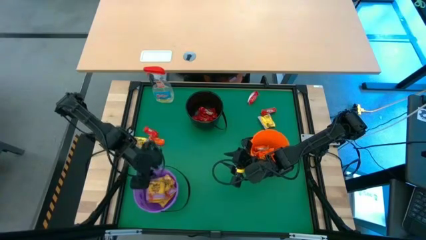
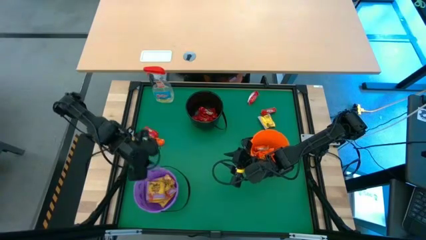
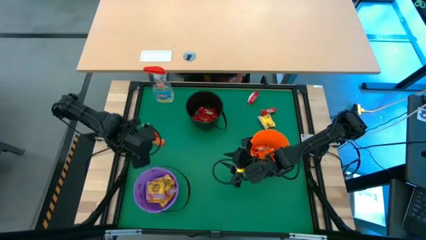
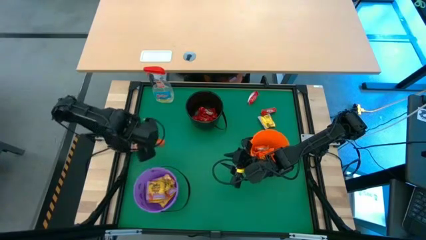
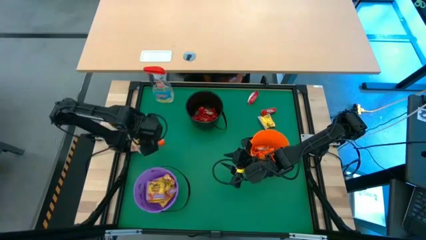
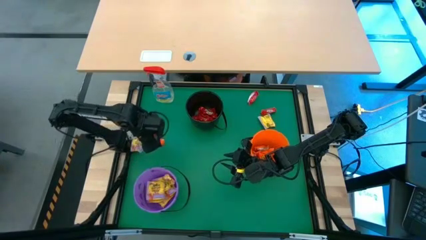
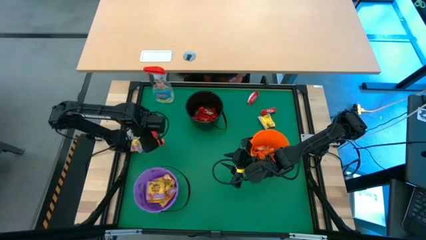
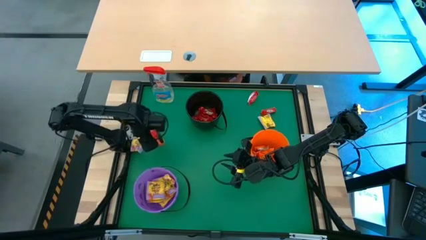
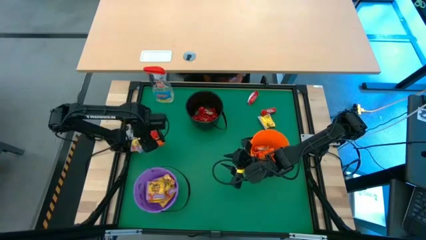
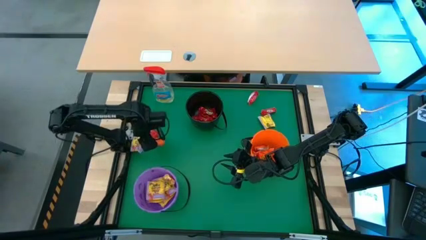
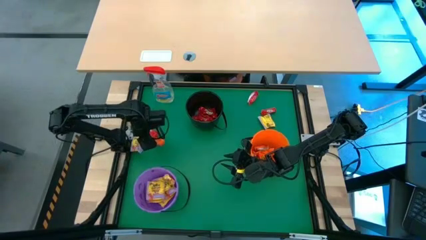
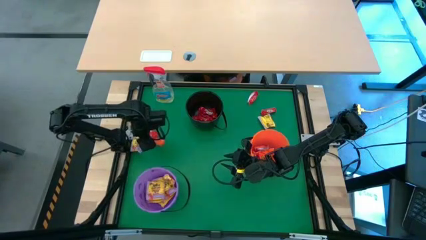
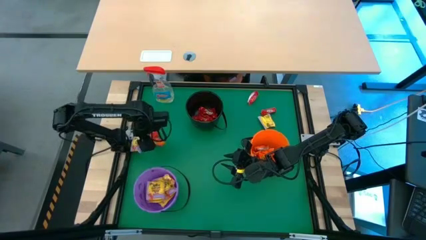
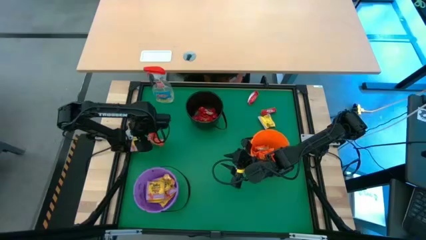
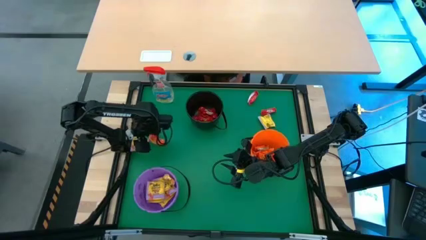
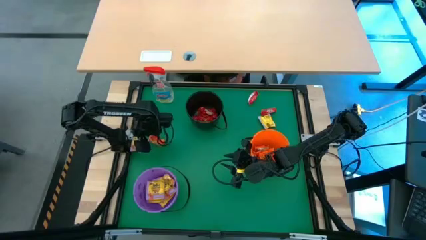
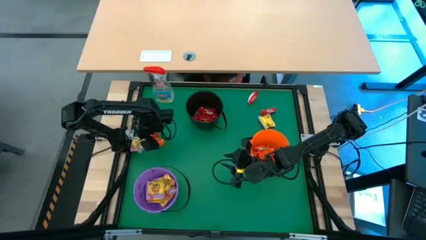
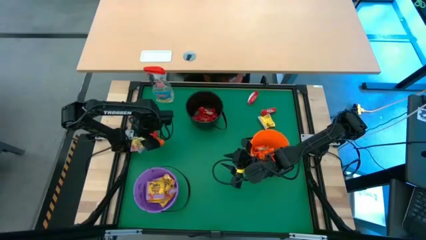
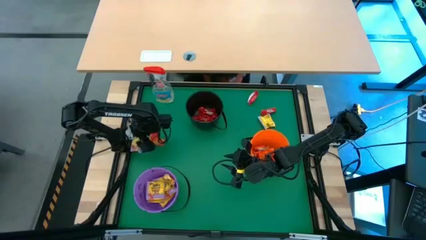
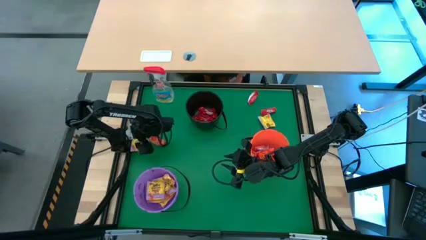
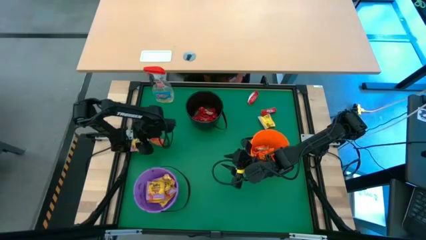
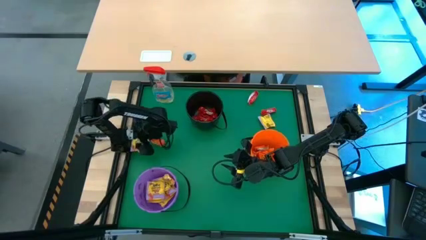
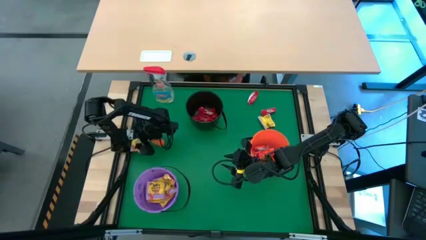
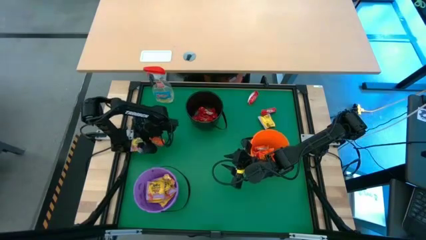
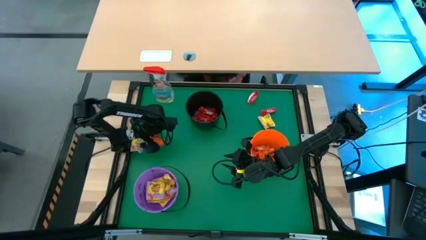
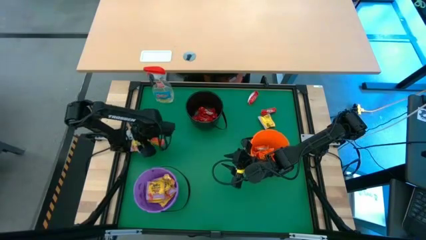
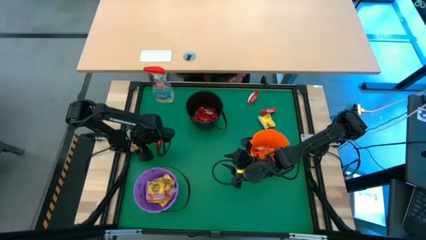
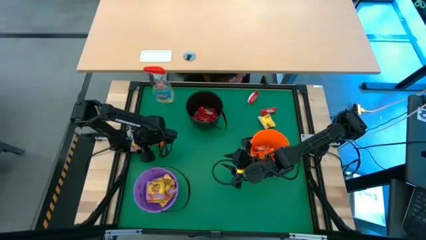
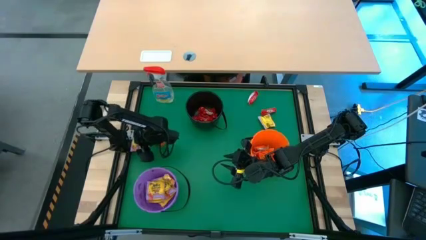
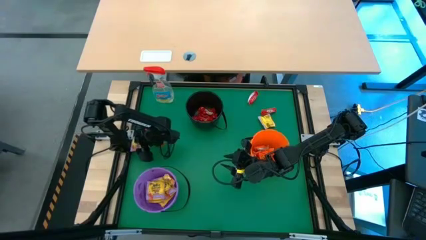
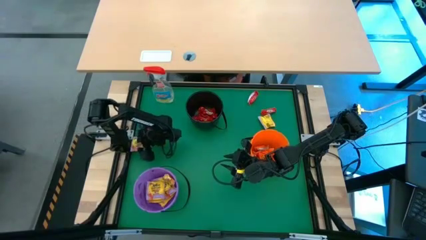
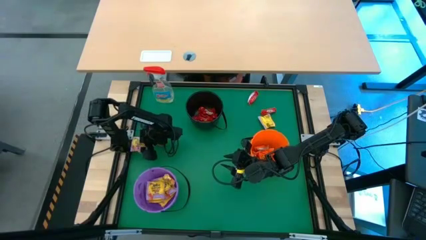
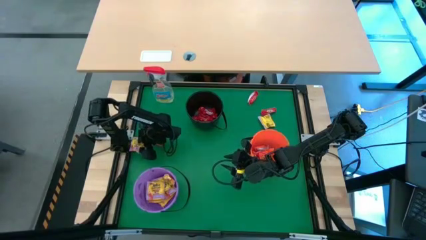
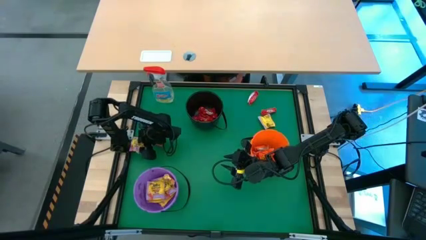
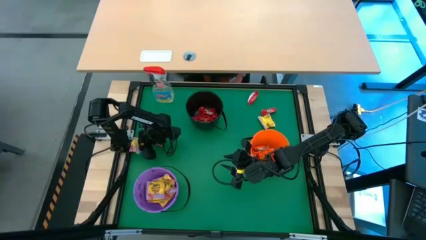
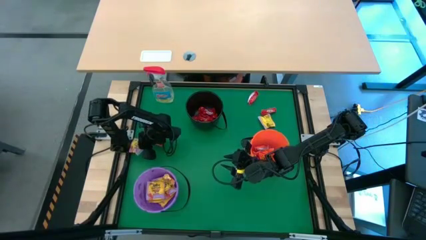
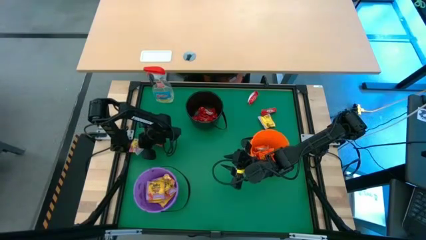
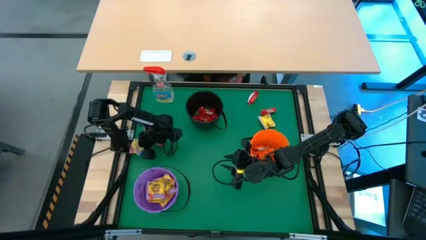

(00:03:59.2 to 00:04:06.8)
Task: Sort candy
Put the yellow candy into the violet bucket

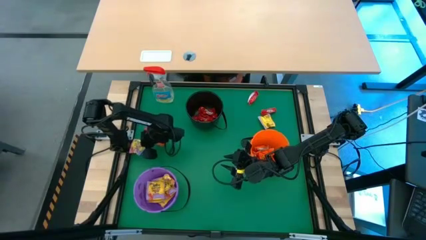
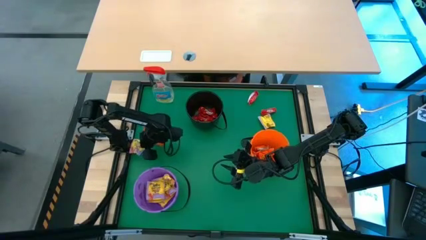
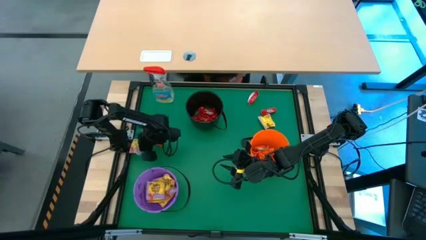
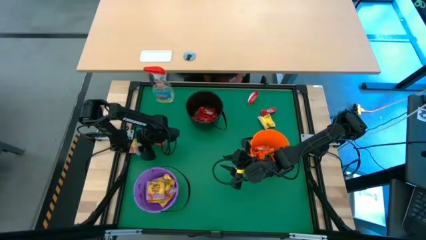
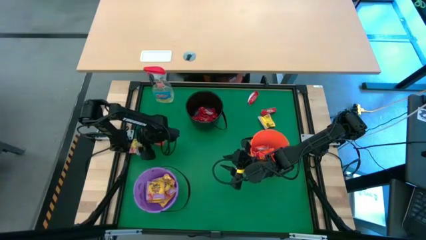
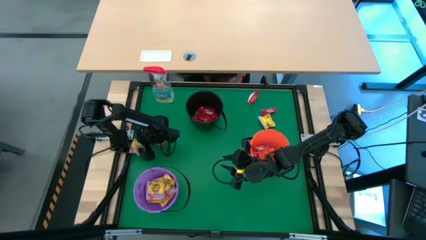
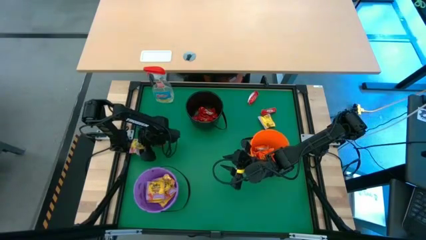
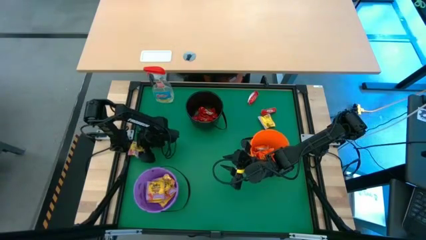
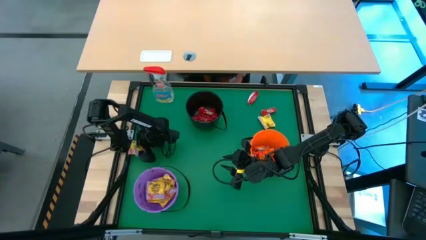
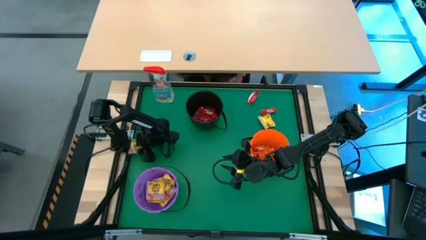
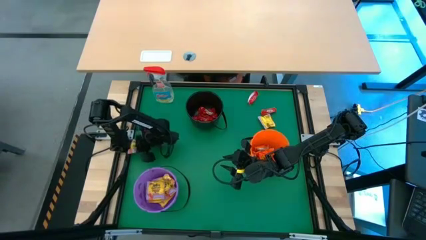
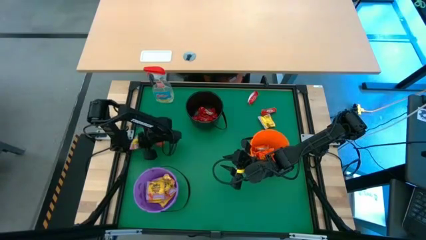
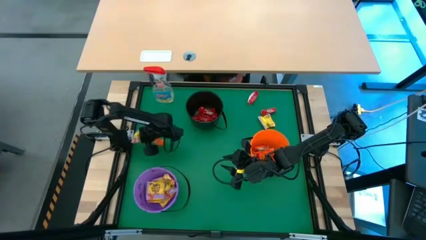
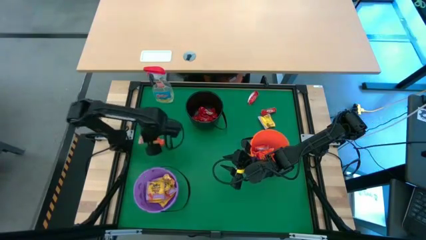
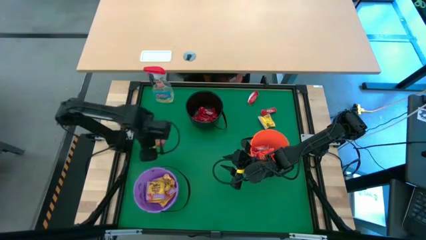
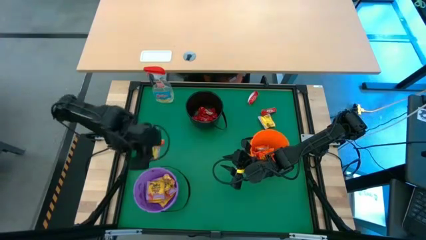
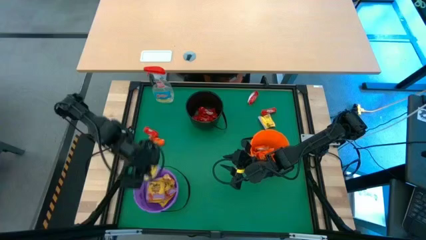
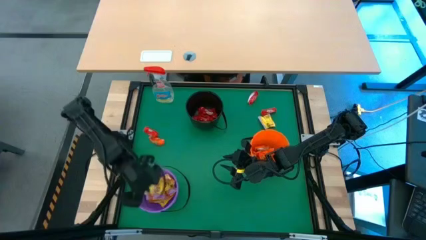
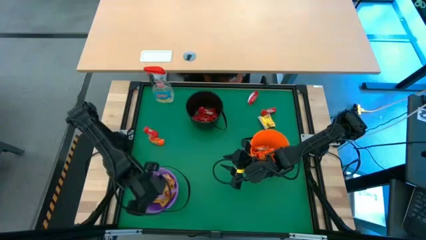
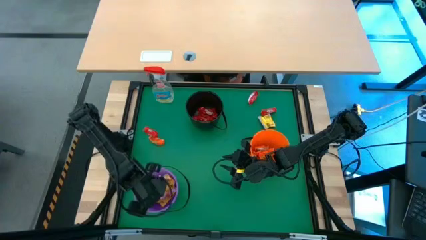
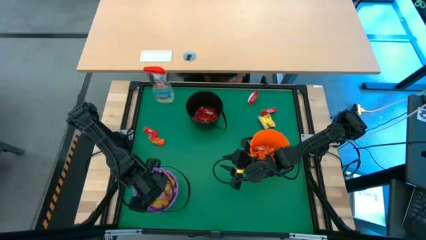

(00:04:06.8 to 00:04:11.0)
Put the yellow candy into the violet bucket

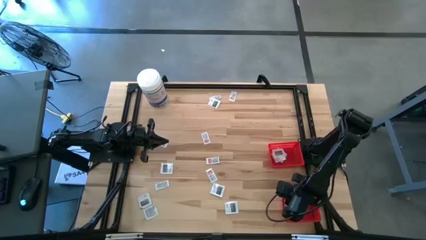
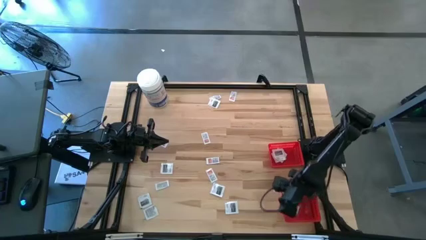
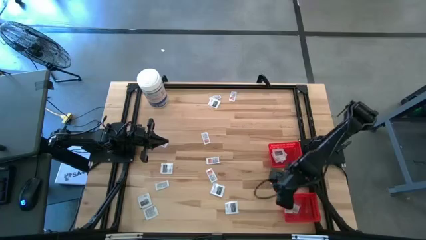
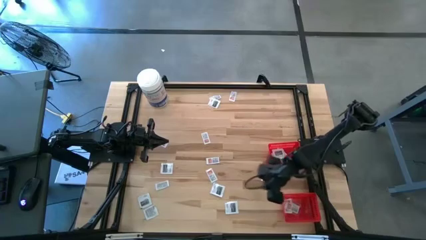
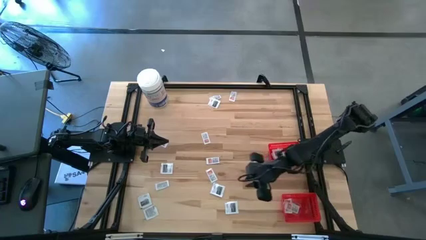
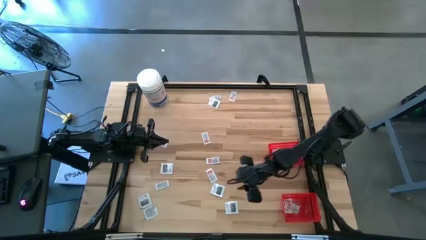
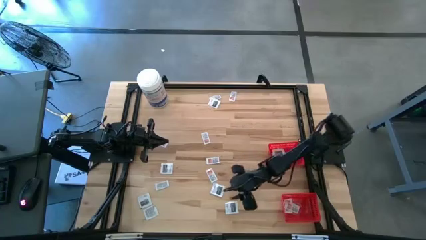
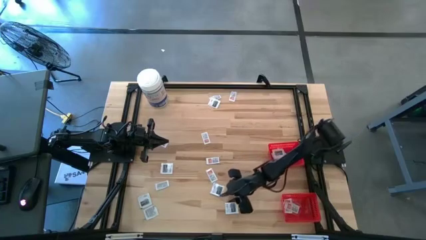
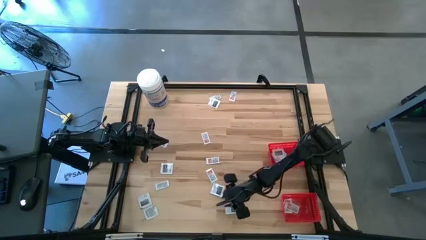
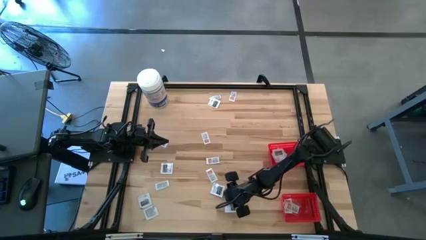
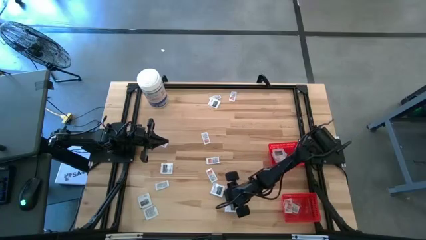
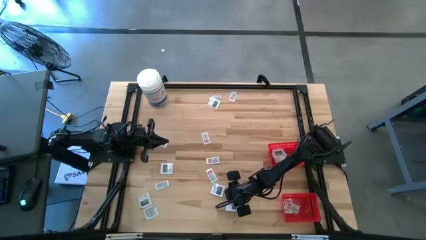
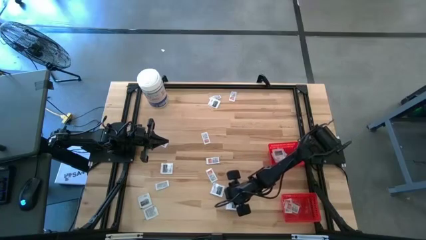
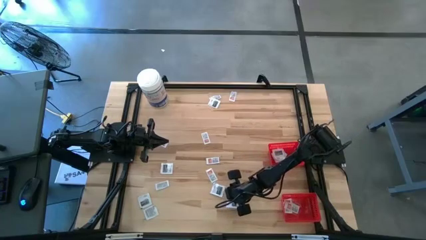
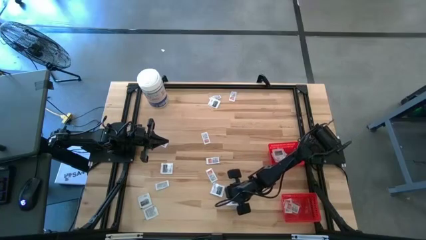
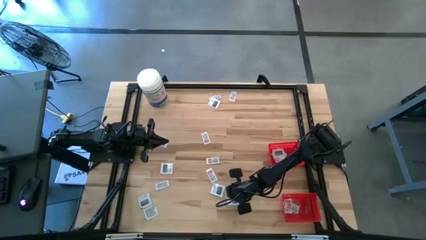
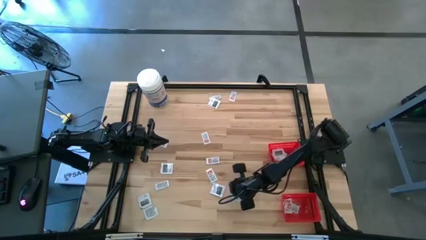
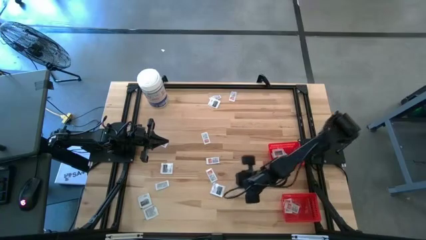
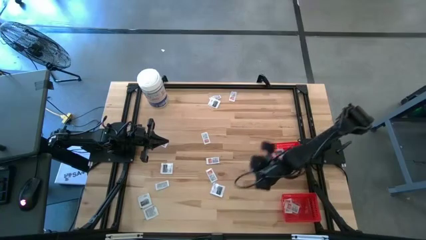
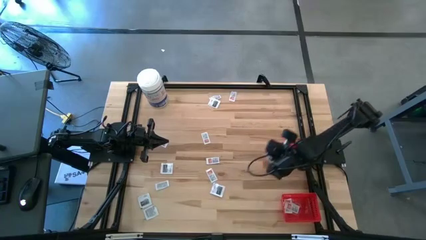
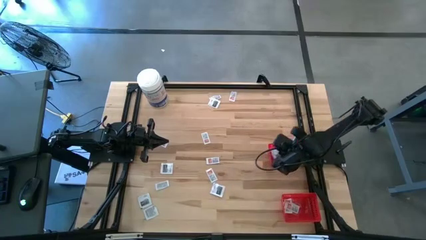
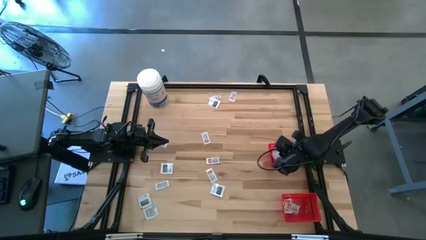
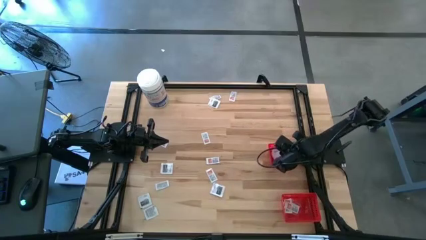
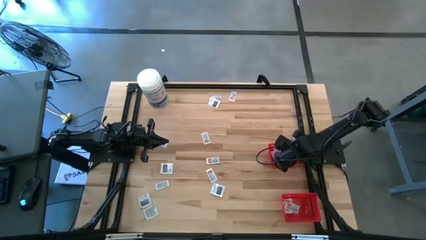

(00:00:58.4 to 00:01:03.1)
Task: Pick & Place First Aid Supplies
Put the black towelette pack into the top red basket
